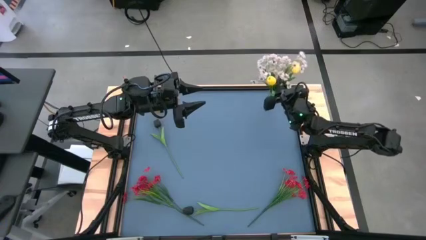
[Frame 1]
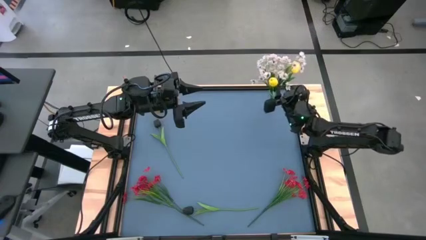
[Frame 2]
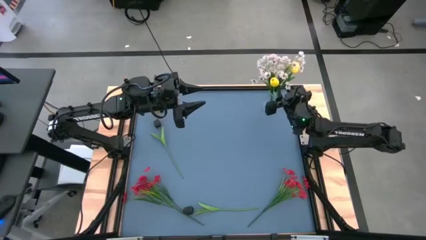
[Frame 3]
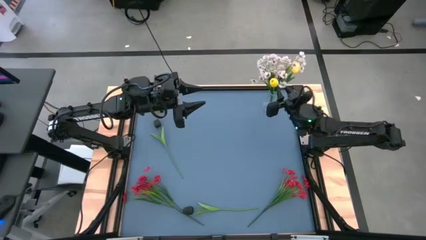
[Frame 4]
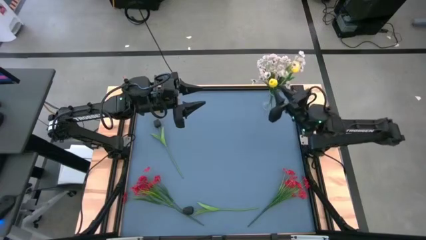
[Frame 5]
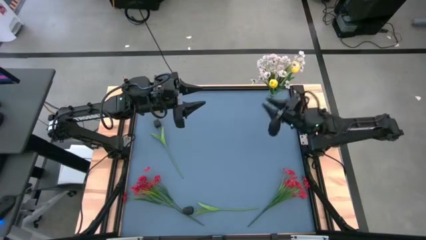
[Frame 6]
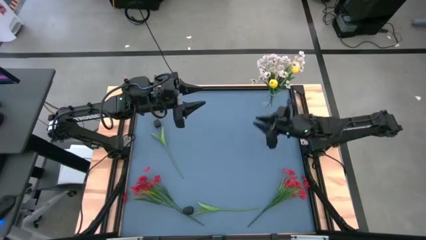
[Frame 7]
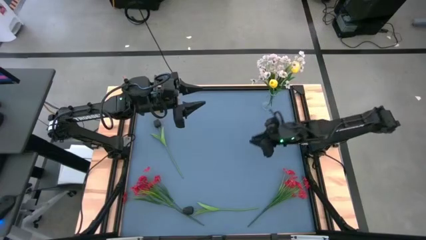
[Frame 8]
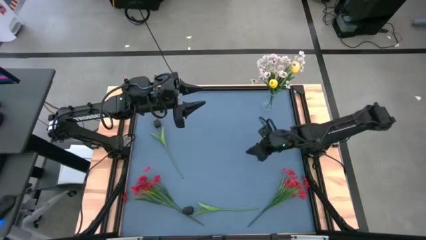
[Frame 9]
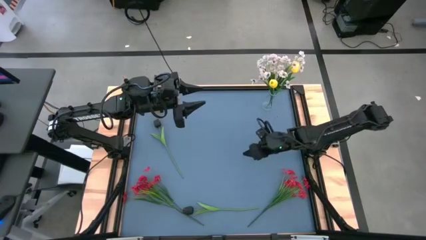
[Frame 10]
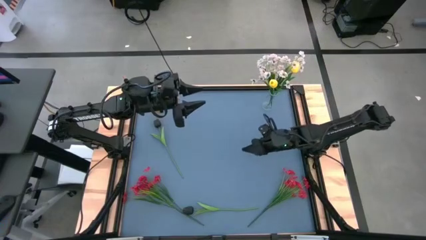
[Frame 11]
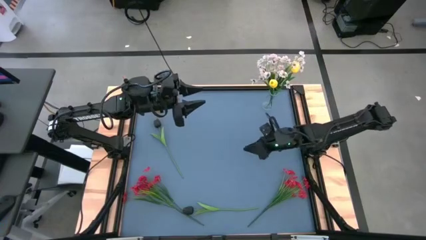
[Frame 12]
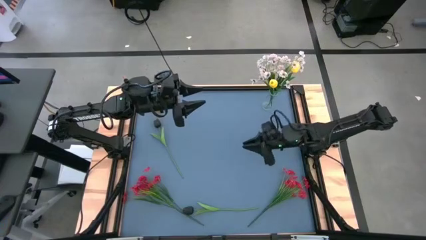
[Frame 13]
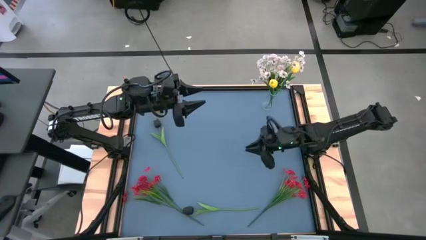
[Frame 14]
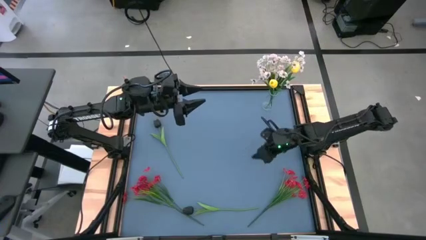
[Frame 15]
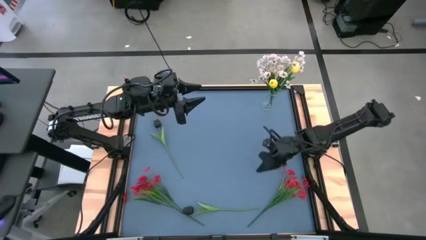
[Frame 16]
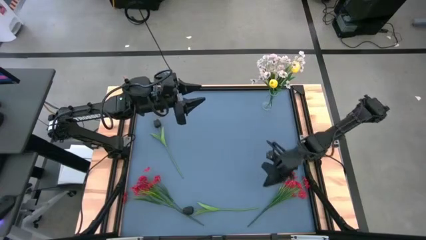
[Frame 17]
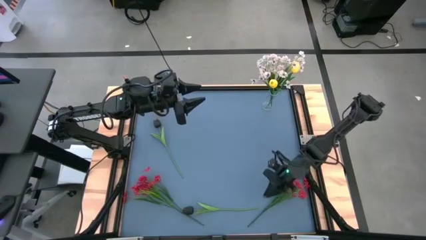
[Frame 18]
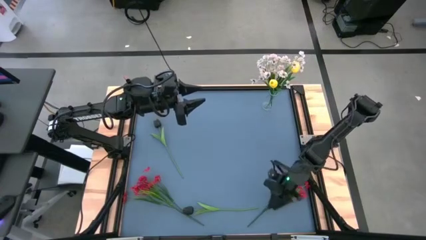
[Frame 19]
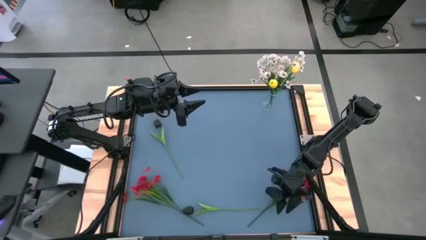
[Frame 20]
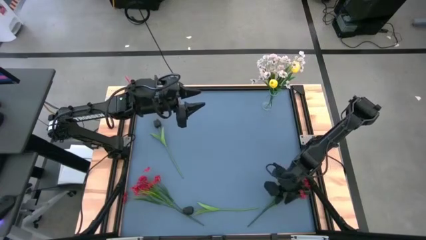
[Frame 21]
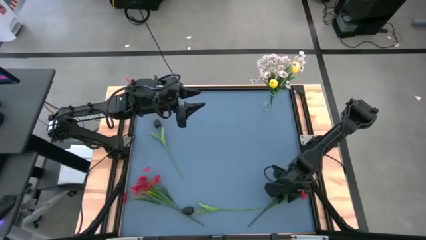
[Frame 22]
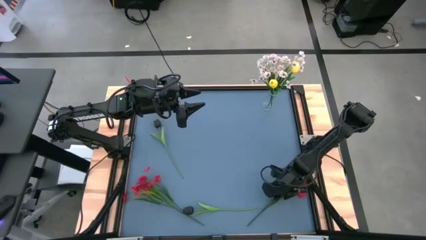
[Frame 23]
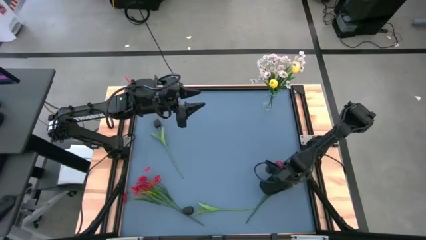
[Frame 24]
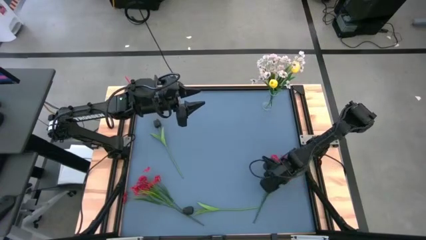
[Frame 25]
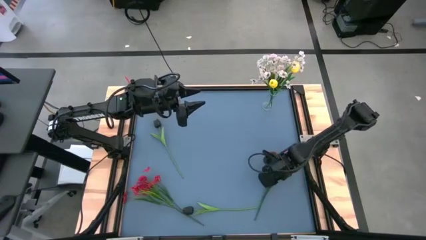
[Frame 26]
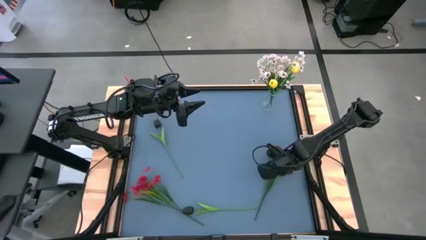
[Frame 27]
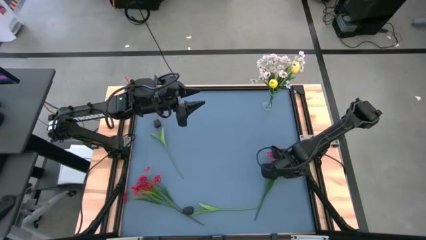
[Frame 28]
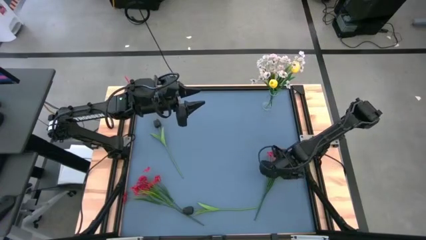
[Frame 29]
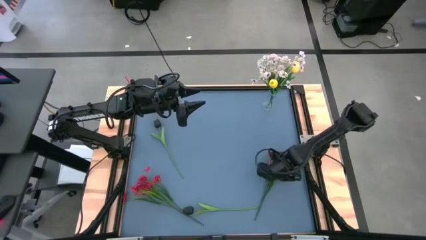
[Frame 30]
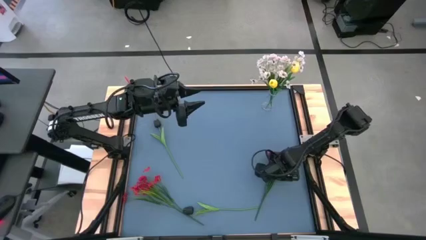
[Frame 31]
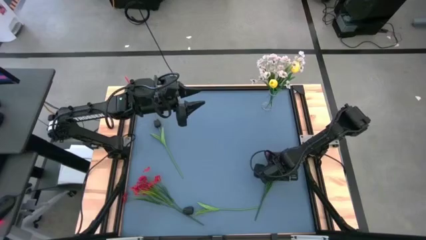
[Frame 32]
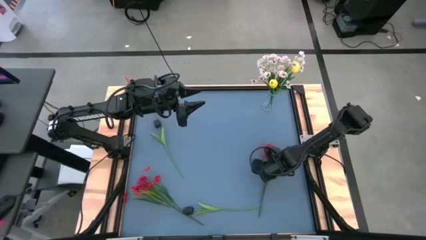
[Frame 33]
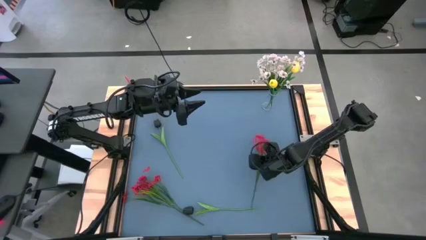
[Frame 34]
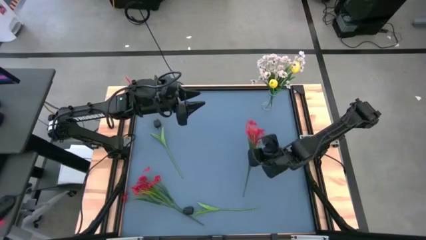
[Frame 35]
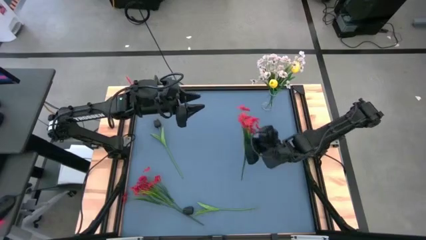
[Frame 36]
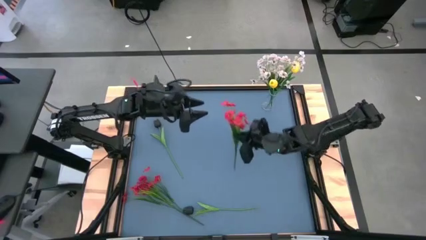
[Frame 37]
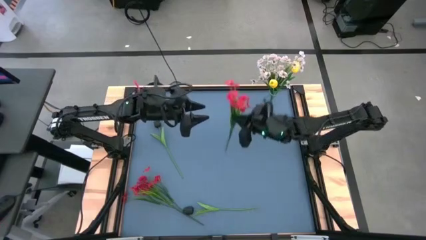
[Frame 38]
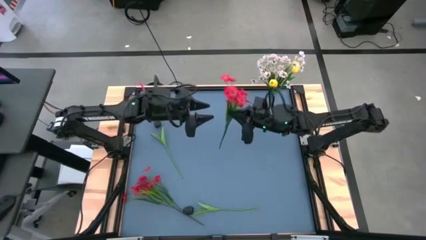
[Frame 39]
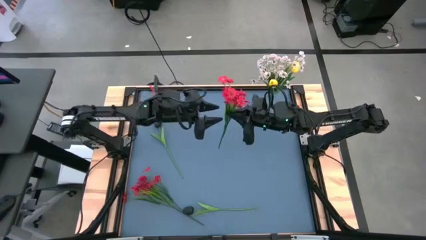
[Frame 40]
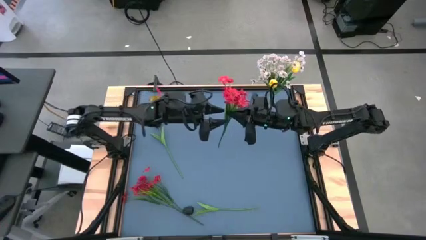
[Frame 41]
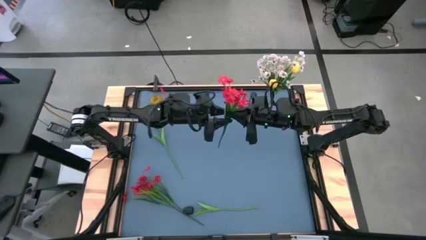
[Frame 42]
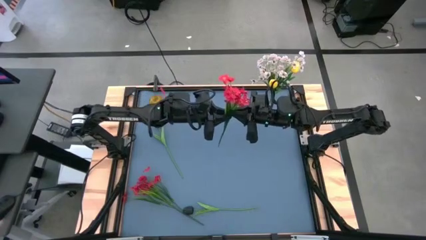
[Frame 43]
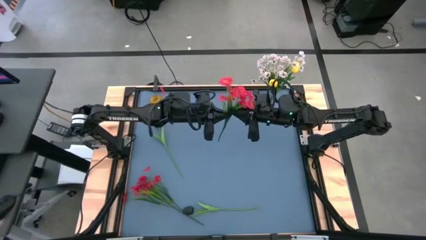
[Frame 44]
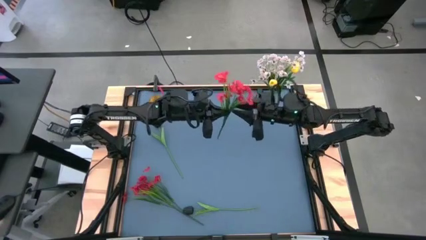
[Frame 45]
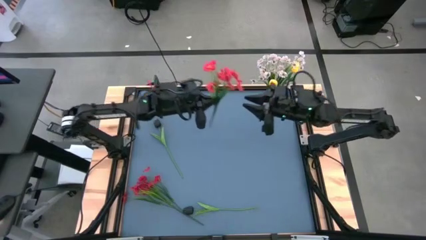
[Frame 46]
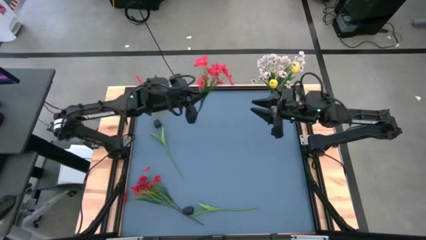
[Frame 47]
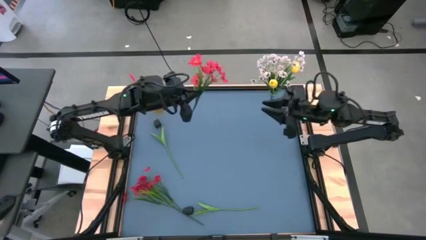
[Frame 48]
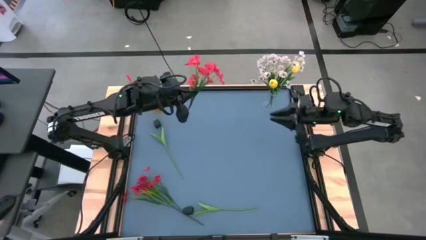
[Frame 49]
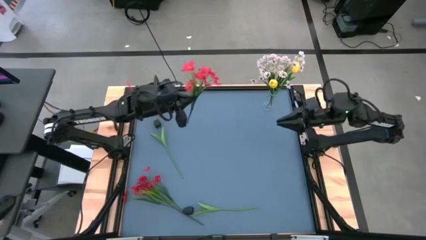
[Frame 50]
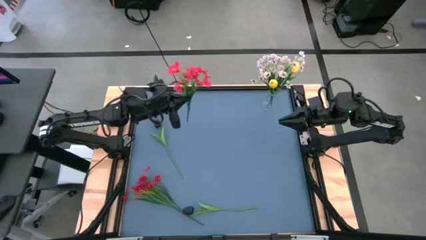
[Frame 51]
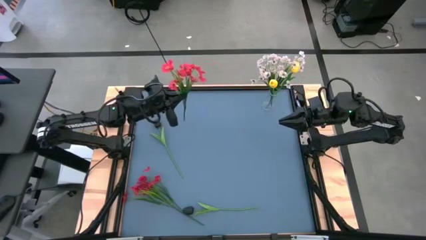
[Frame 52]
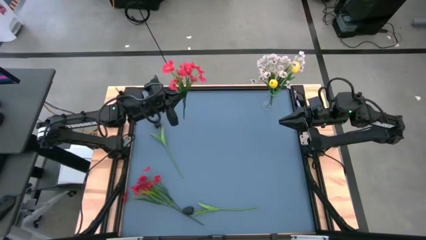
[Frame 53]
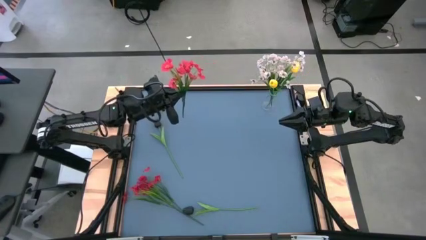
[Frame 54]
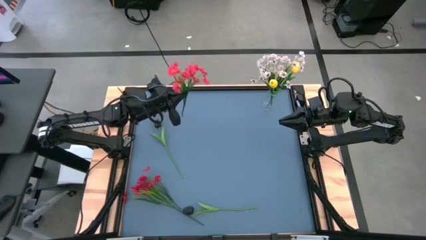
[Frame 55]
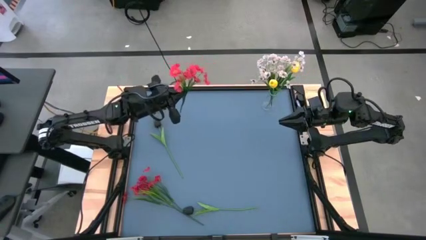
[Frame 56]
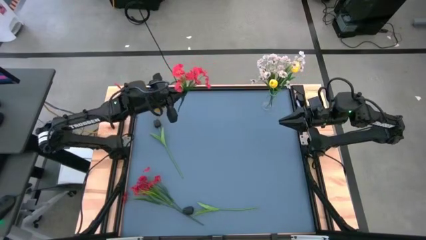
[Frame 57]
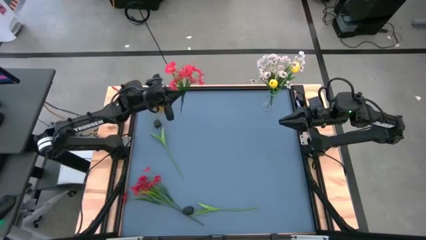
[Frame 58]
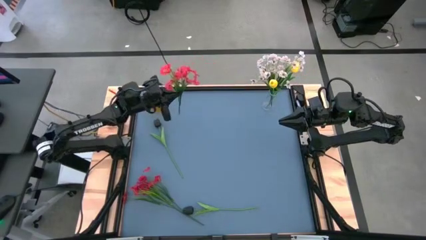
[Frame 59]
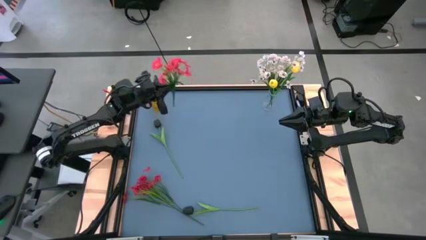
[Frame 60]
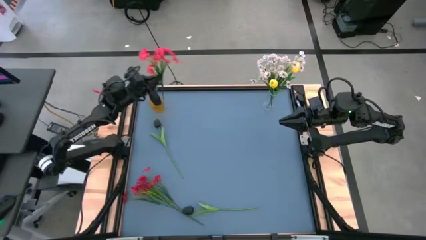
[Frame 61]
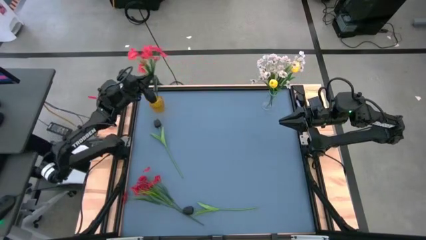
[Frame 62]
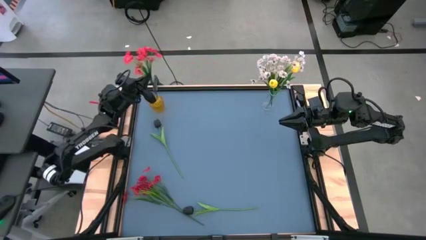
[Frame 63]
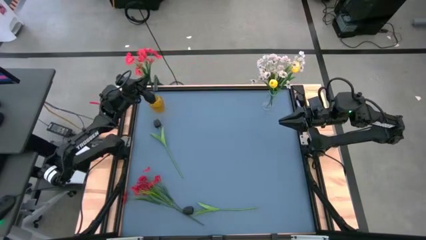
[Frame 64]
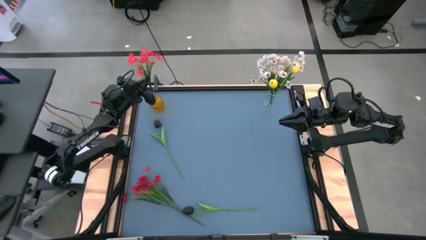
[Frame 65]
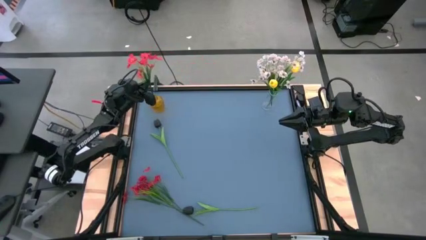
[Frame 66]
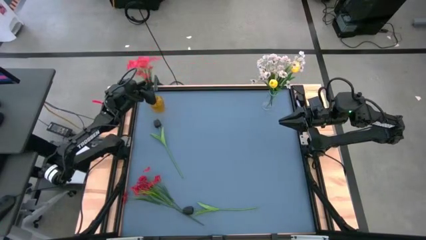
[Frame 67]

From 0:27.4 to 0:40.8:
Task: Sort flowers into vase by color
Put the right red flowers into the yellow vase

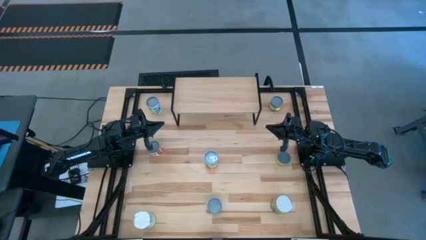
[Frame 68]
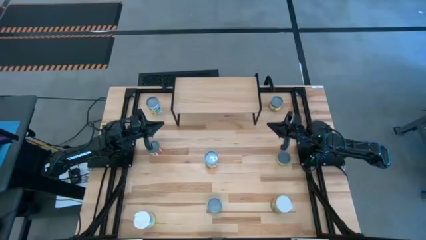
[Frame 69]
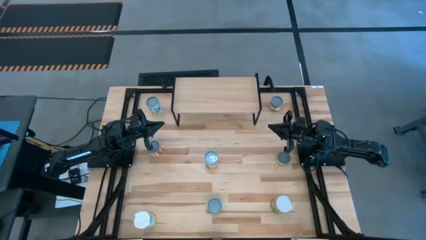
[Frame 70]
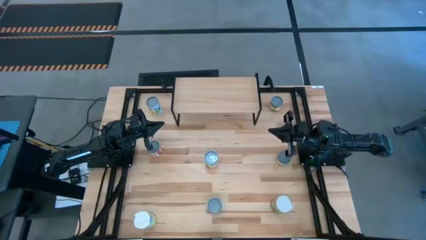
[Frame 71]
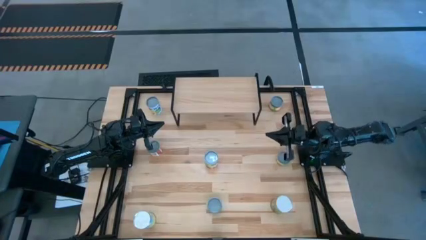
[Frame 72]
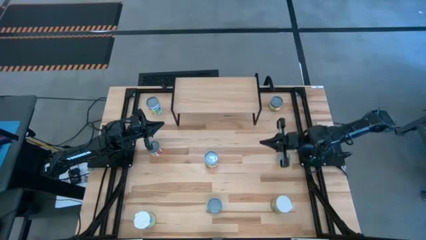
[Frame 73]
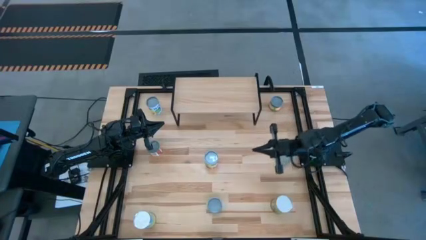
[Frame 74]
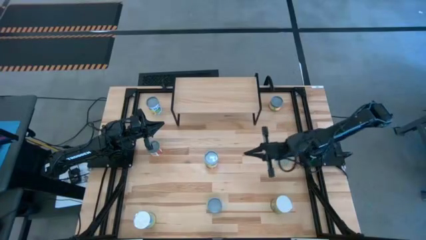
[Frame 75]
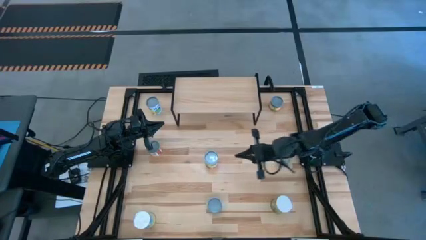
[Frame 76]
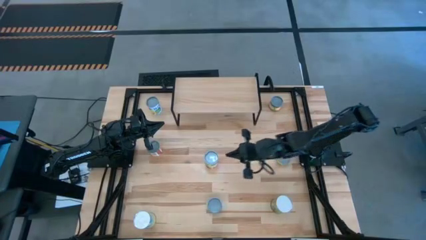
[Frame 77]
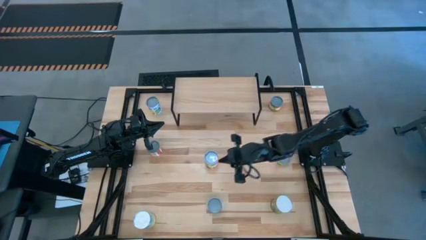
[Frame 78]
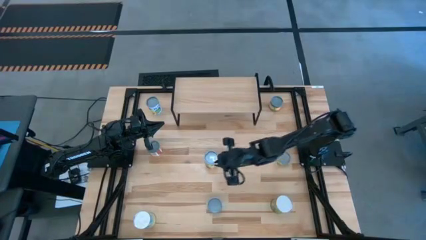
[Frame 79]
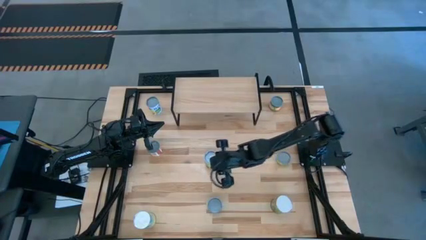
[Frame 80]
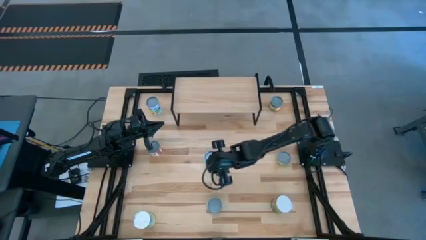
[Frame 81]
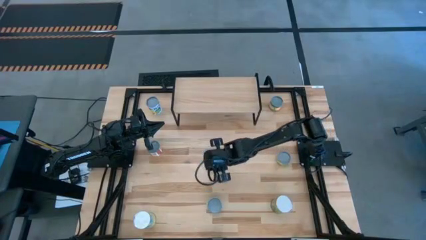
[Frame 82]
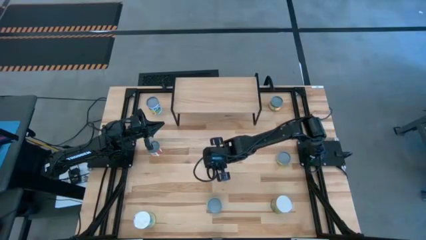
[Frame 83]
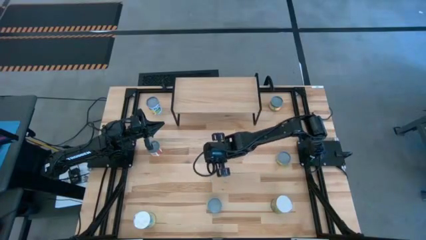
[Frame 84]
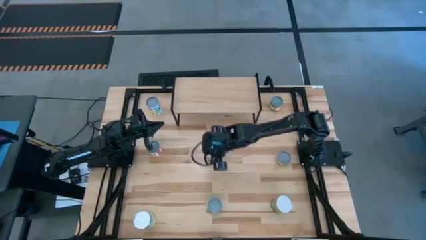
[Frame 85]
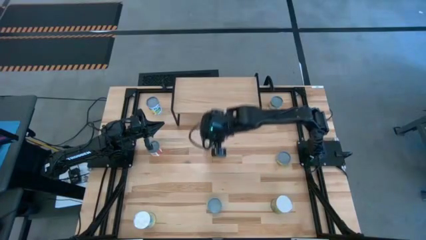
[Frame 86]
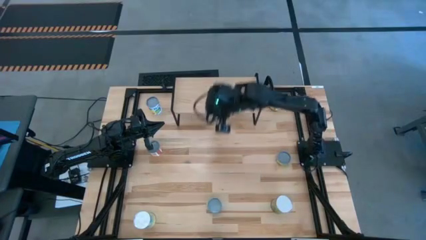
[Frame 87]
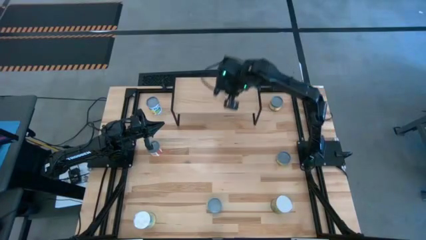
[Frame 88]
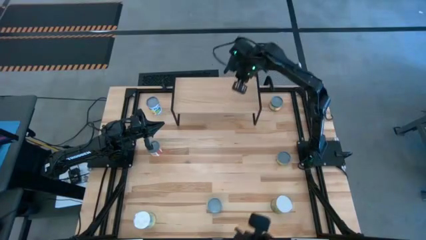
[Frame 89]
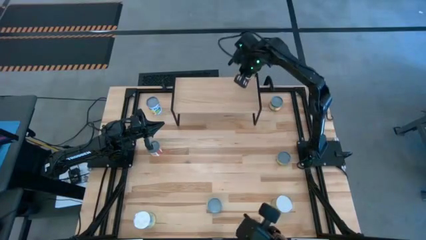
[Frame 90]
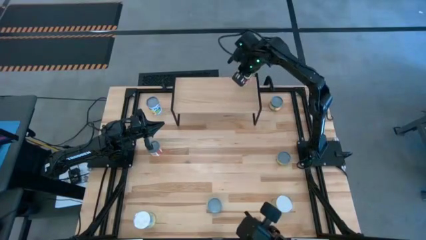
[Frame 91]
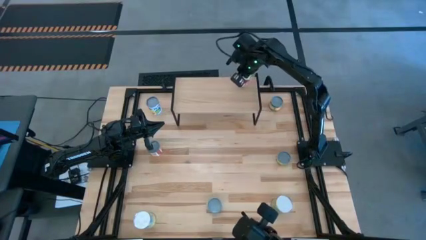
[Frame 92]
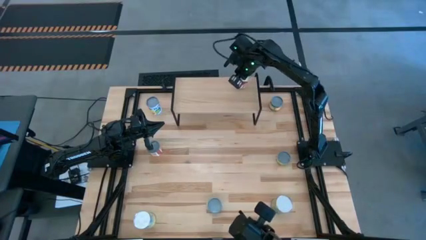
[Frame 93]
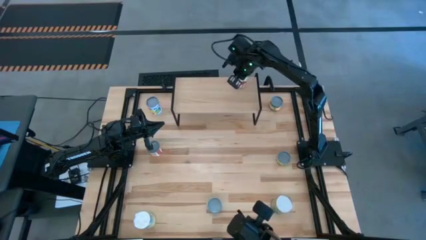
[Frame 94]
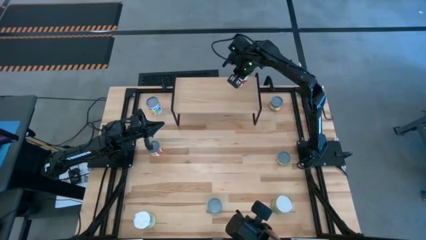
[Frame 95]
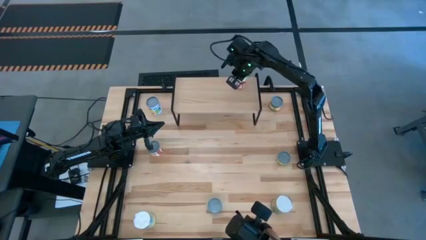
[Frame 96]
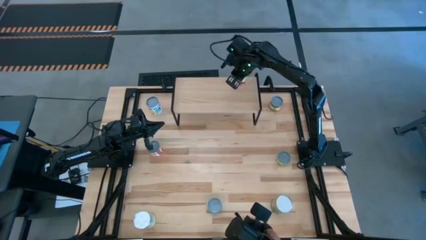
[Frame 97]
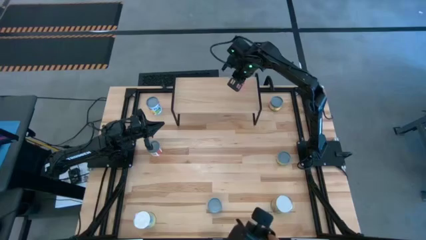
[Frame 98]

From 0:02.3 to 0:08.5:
Task: Pick and place cans onto a shelf
Put the green can on the shelf
